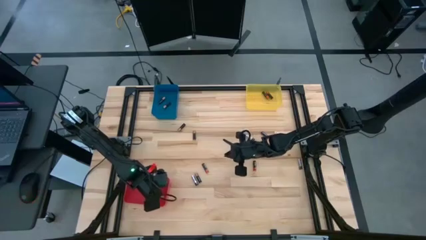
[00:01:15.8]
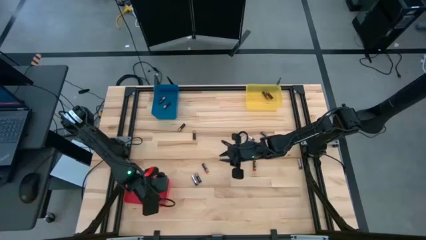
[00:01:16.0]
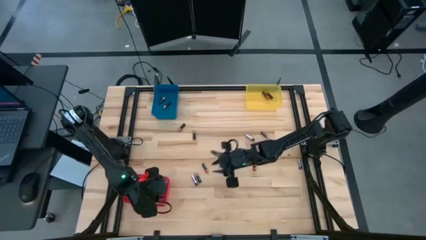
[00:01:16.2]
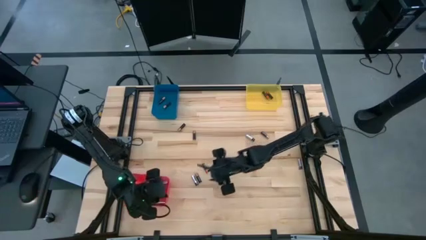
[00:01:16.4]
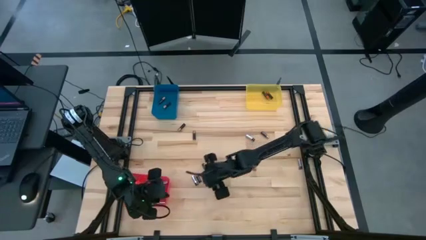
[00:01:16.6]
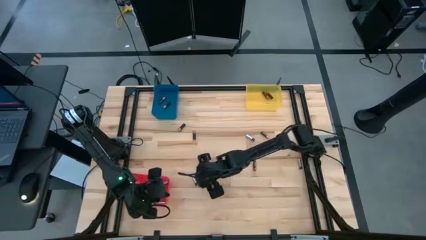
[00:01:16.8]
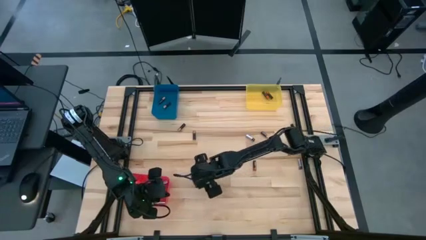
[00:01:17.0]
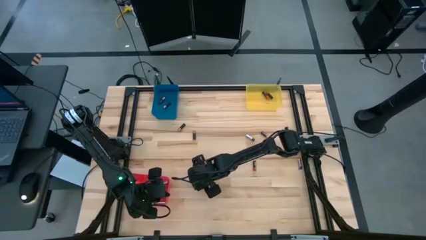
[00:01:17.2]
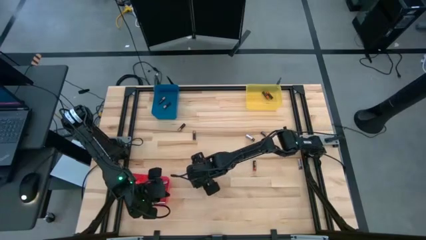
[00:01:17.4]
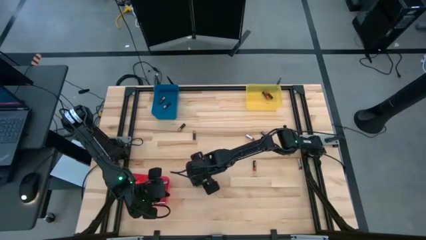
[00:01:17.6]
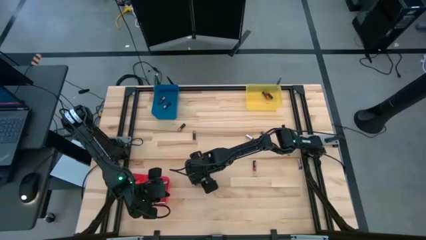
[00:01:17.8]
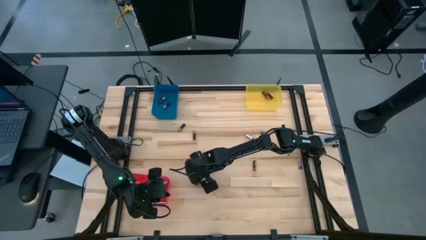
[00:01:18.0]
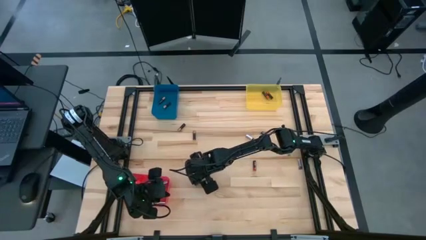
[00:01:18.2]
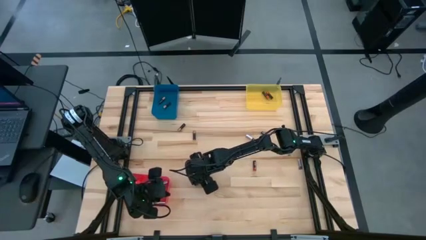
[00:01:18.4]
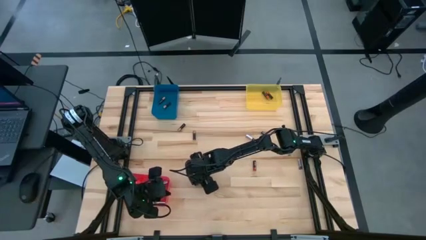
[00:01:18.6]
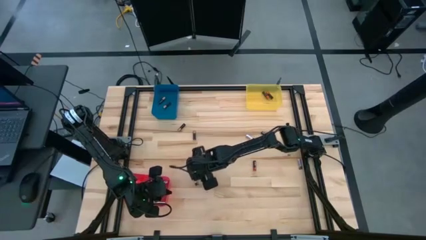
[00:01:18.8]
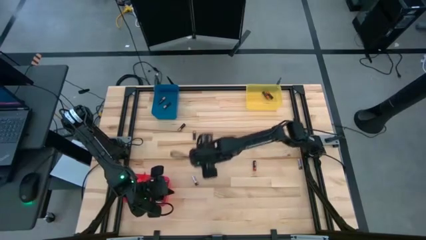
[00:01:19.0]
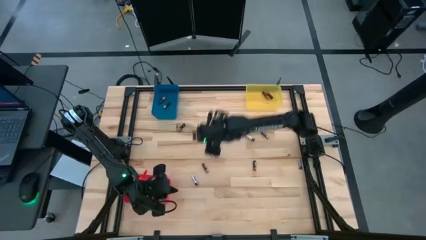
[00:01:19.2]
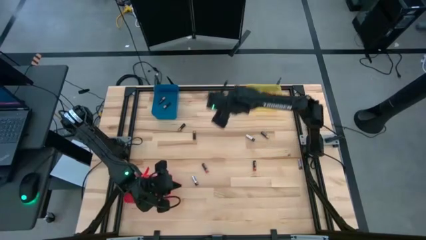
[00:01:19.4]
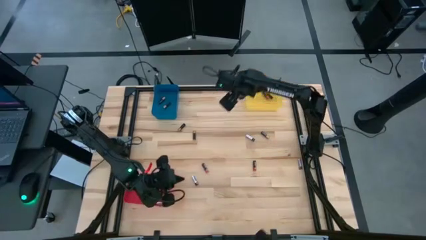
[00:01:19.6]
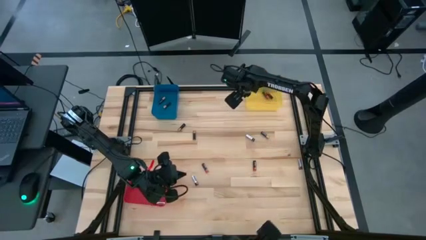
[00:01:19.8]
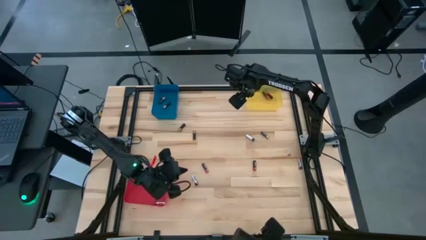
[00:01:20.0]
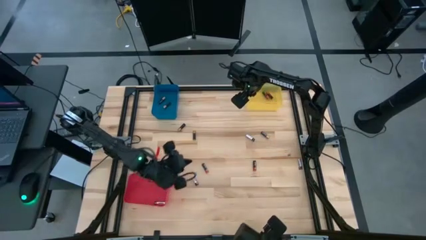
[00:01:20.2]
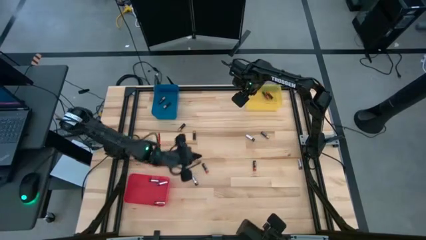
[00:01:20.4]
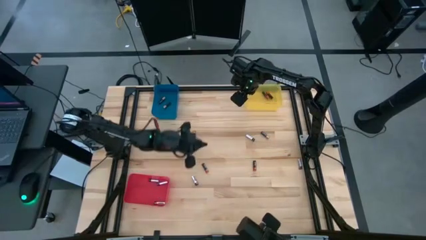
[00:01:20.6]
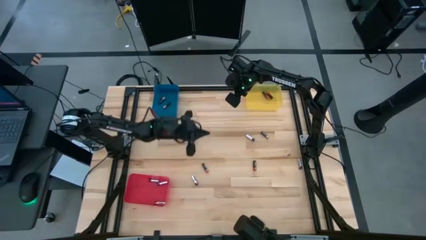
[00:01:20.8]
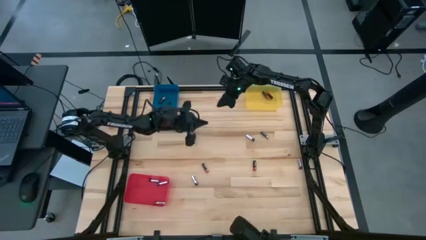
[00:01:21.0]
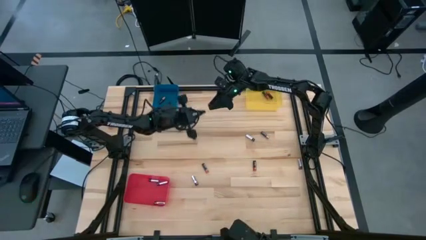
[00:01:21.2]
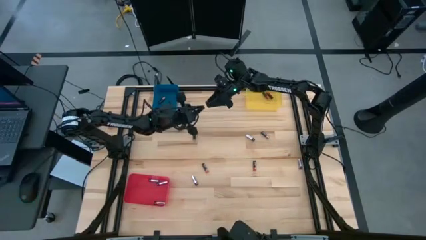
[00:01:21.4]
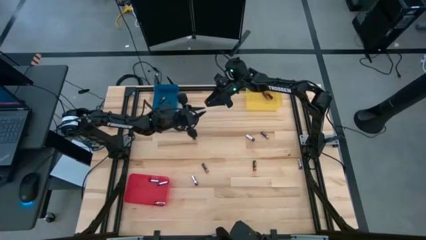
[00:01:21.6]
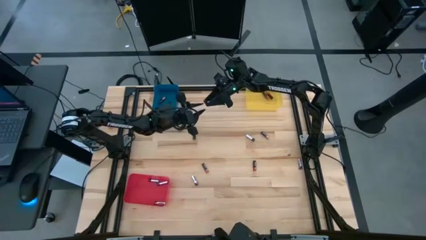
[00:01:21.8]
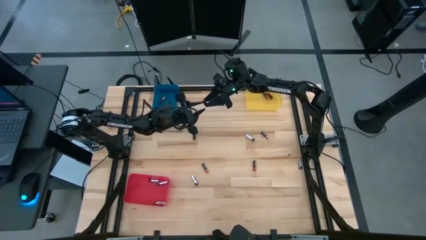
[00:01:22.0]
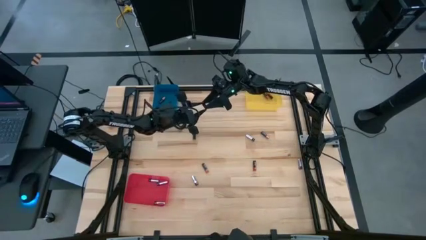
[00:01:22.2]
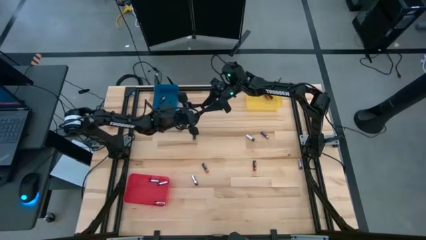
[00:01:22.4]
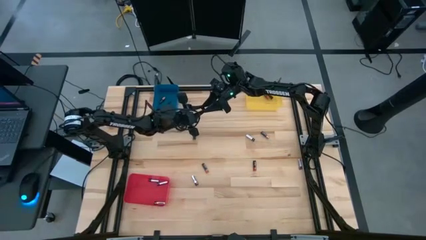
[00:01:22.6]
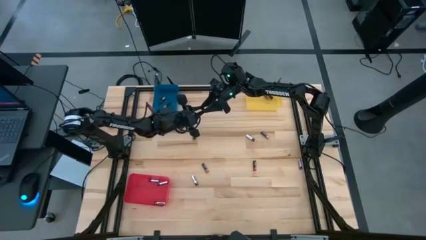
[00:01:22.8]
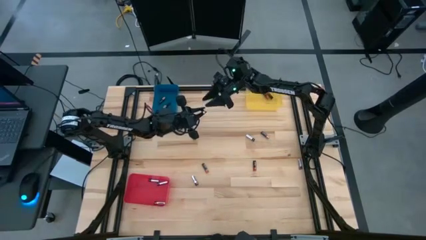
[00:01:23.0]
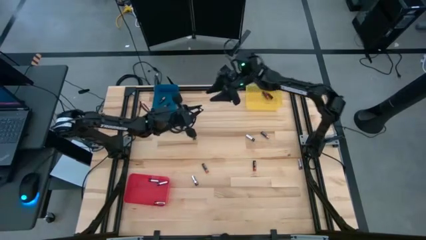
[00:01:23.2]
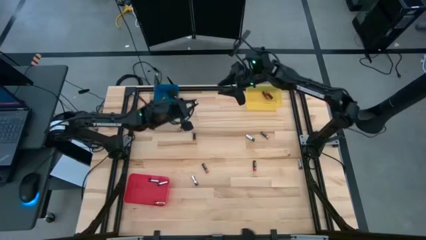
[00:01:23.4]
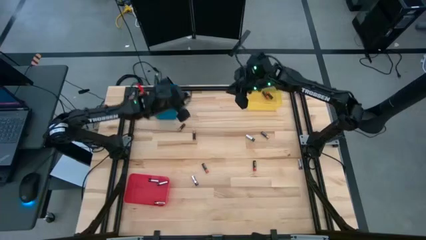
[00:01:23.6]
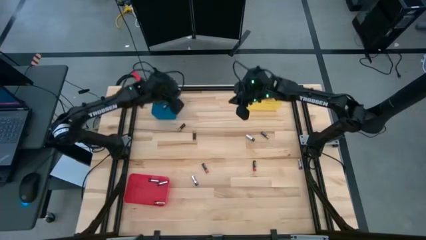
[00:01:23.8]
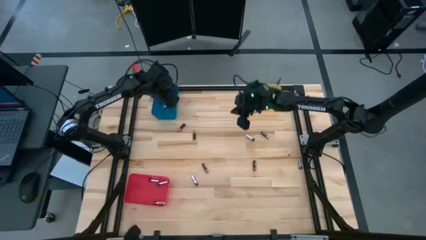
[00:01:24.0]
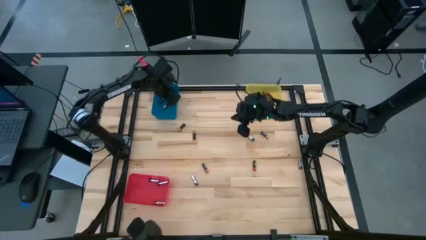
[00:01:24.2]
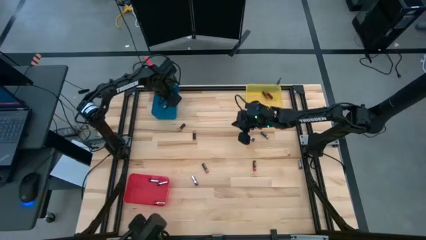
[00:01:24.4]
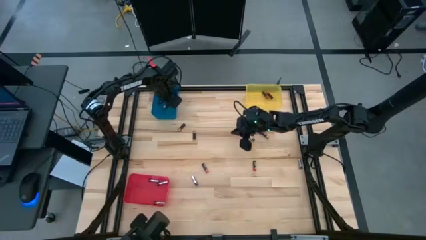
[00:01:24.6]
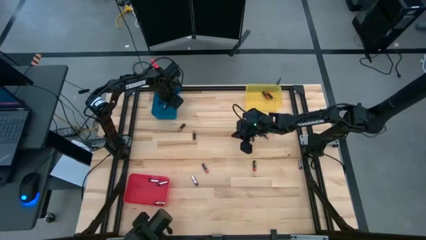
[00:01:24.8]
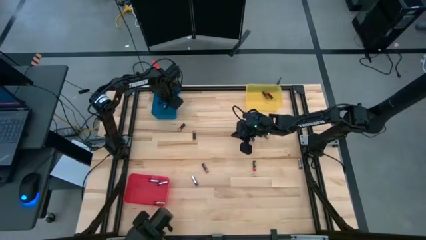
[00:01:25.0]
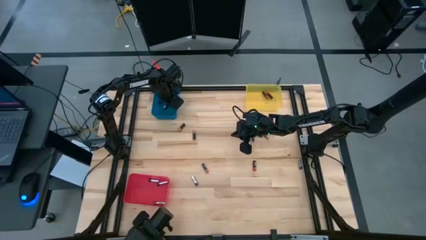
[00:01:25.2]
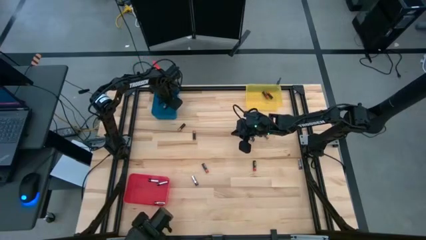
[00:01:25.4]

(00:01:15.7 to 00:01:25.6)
Task: Sort batteries
Put the black battery into the blue bin

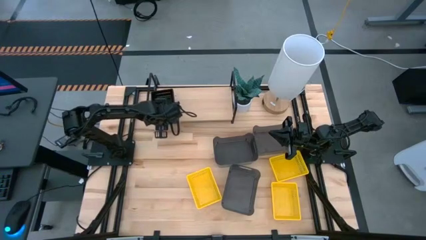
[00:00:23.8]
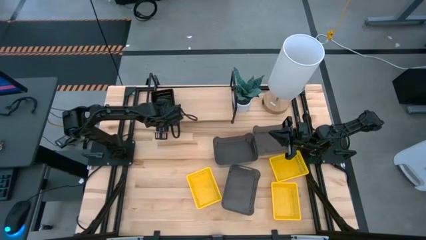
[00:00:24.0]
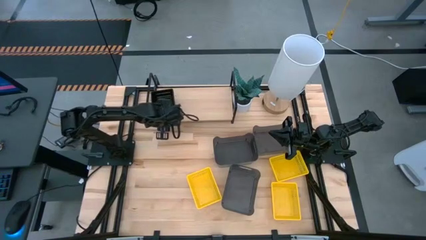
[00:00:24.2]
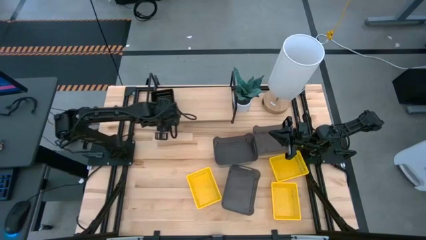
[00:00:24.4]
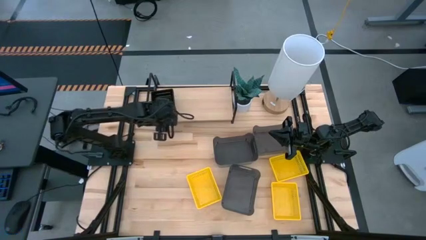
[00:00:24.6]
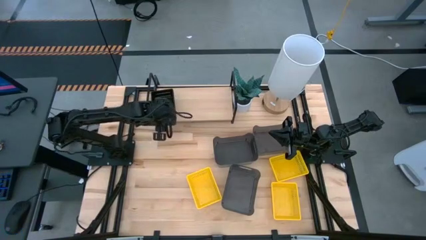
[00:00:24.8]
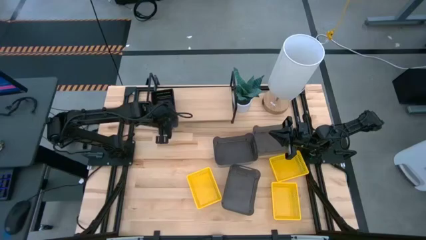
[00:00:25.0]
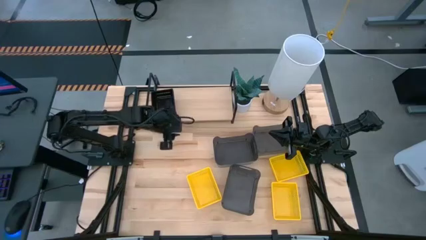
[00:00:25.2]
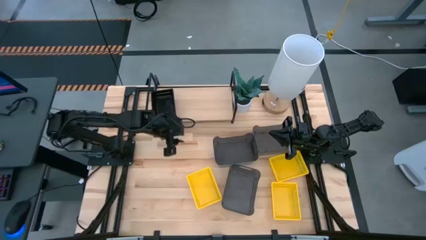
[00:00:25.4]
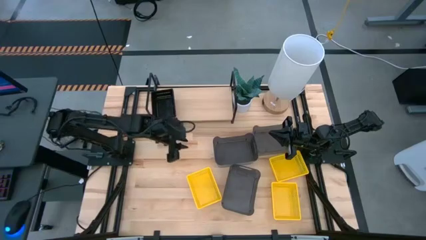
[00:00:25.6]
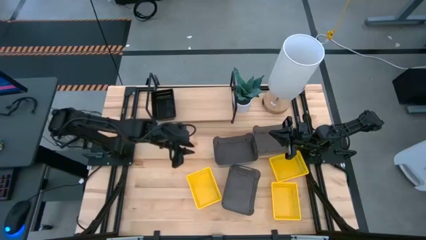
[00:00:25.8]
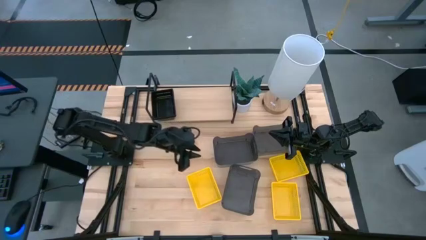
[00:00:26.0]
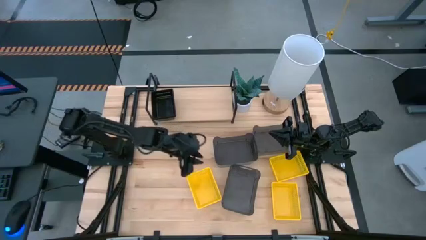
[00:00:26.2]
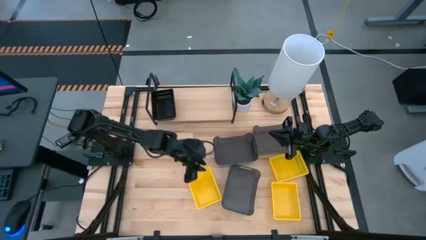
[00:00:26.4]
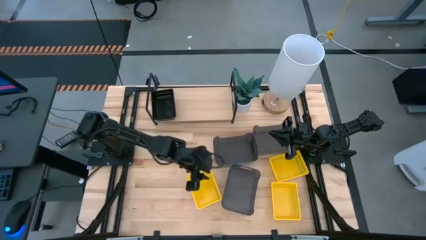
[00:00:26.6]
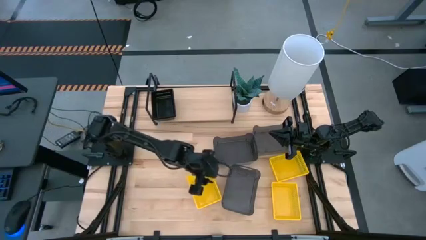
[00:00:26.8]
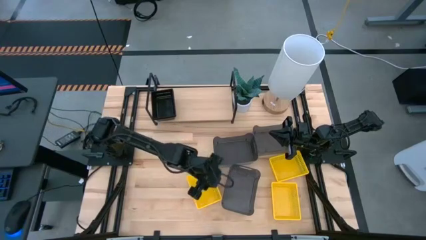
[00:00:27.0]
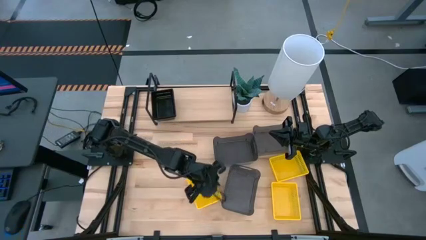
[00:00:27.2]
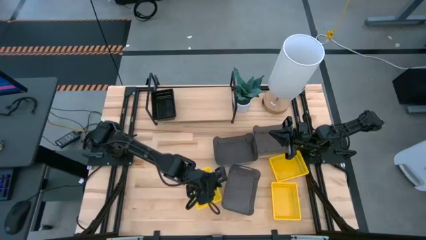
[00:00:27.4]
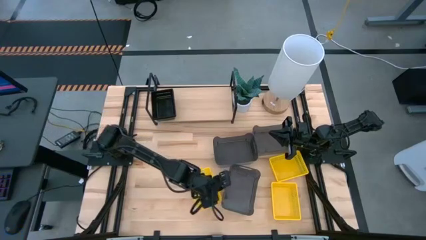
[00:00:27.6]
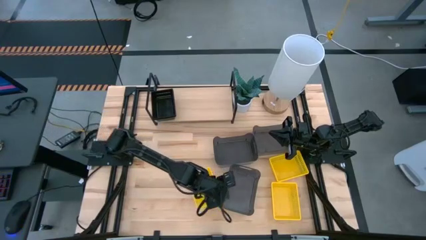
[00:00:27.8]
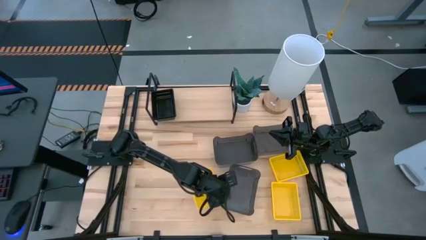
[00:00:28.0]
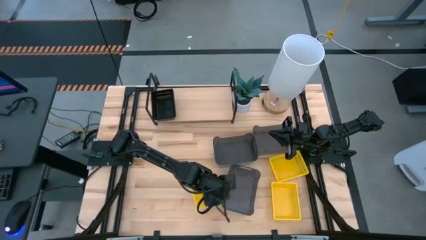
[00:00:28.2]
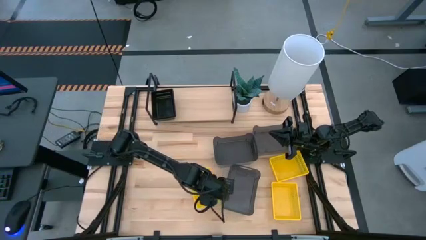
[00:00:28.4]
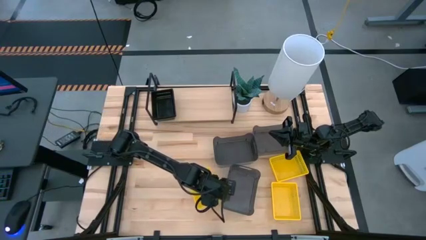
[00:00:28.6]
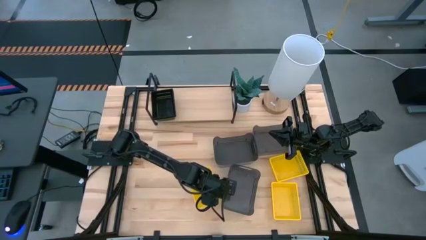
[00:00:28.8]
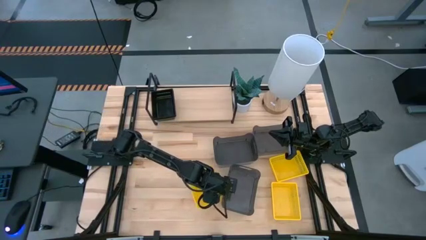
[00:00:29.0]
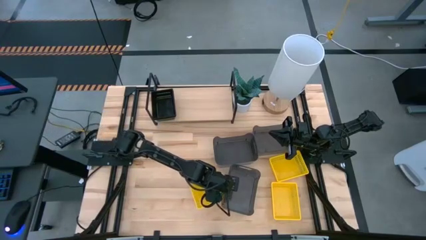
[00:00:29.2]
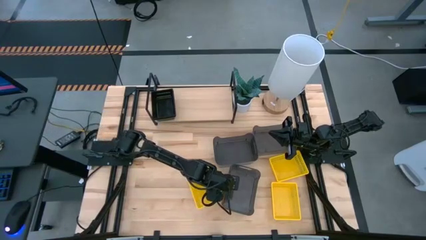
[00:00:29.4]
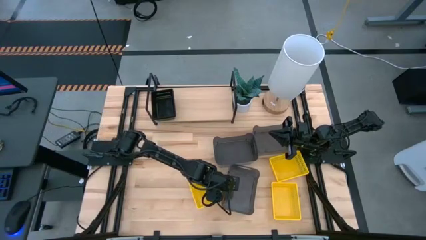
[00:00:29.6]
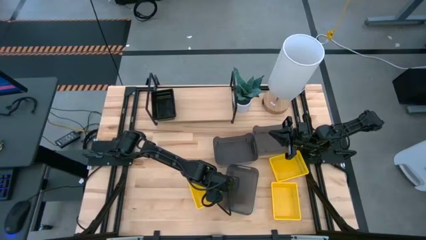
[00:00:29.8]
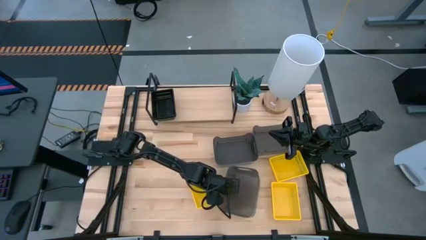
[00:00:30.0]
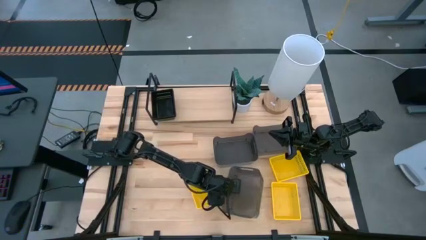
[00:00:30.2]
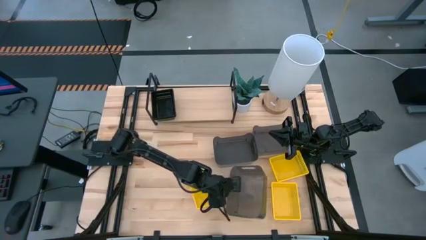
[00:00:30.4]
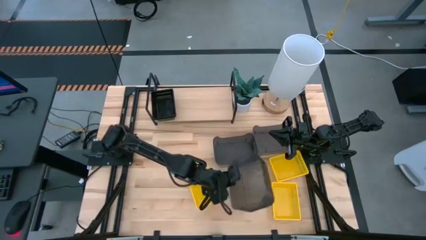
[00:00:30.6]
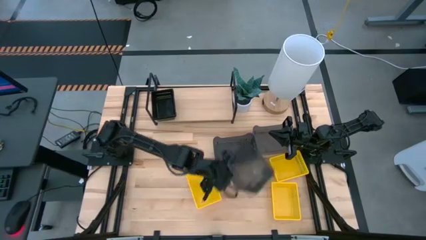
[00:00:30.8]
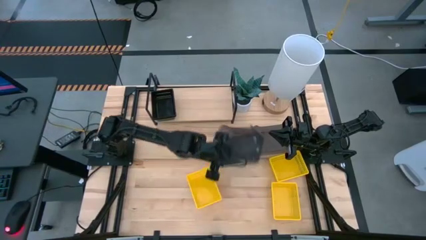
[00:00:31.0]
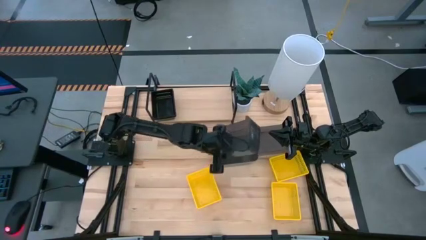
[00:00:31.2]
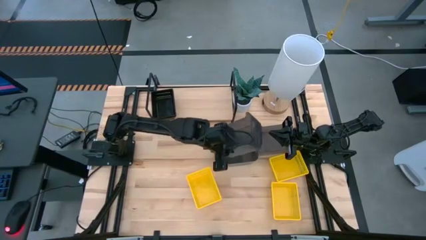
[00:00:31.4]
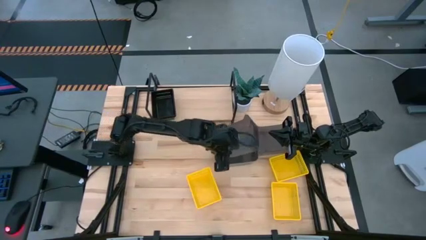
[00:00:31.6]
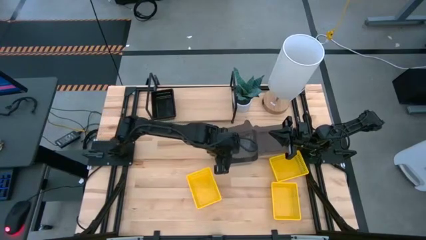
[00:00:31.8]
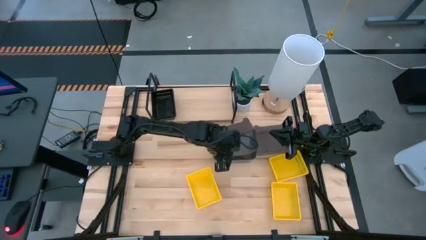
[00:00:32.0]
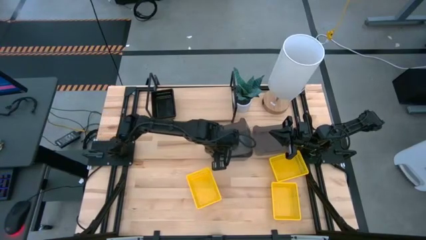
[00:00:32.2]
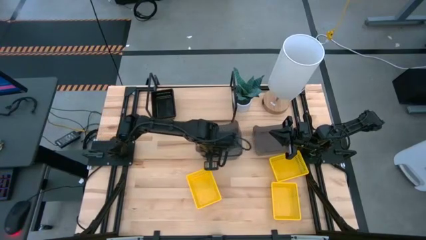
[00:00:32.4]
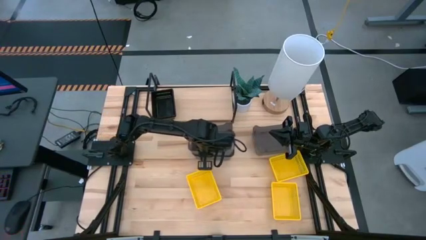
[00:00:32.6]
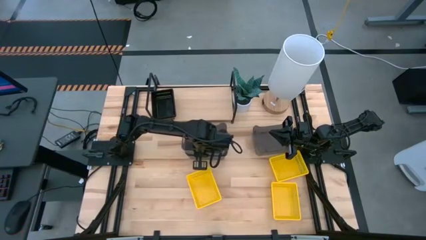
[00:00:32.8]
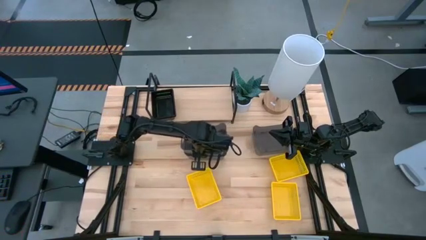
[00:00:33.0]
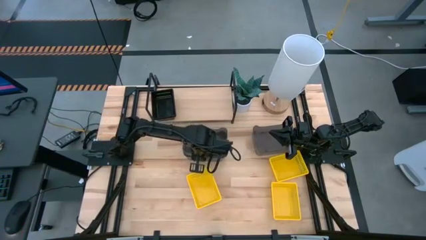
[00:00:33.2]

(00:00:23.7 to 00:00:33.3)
Task: Stack baskets on shelf by color
Stack the bottom gray bin on the left gray bin
